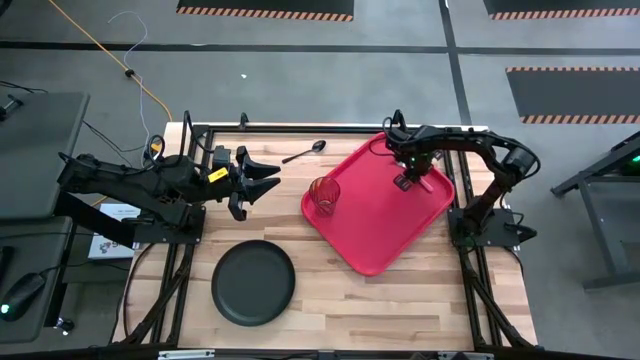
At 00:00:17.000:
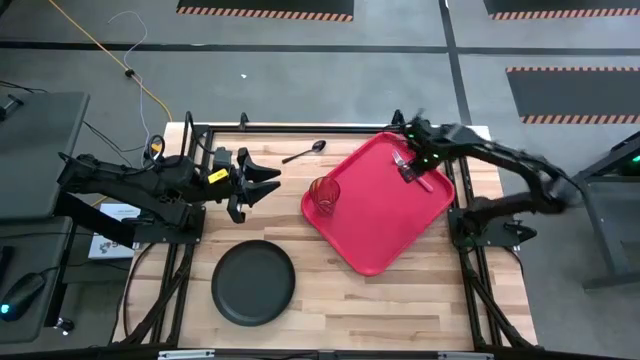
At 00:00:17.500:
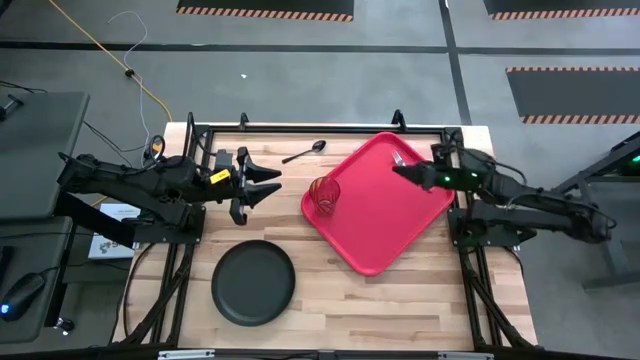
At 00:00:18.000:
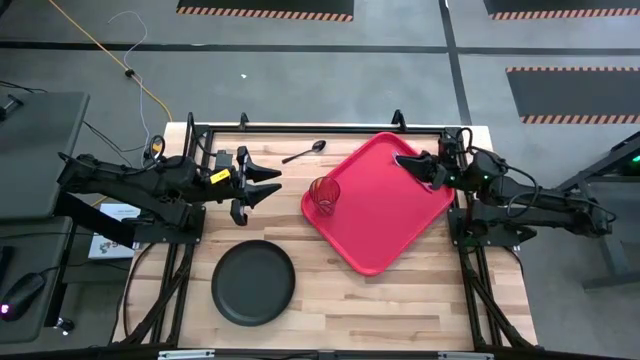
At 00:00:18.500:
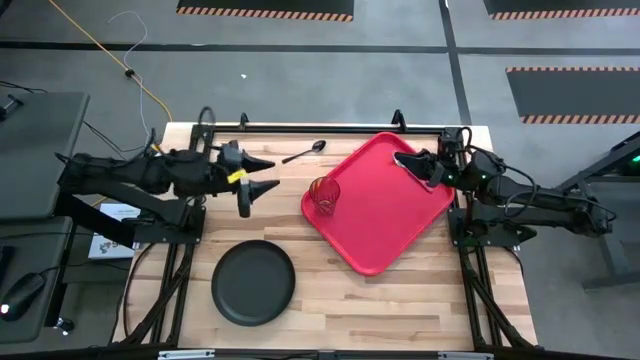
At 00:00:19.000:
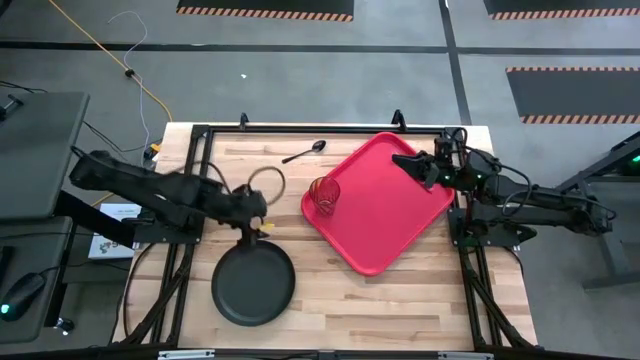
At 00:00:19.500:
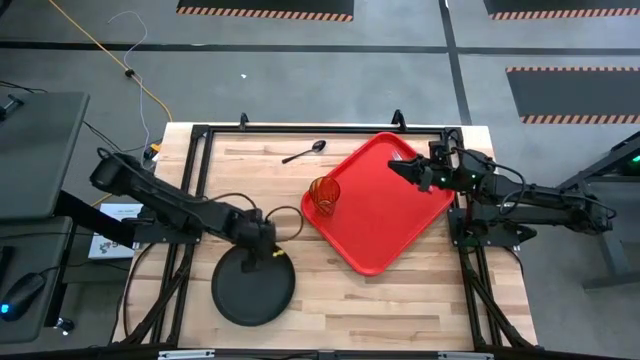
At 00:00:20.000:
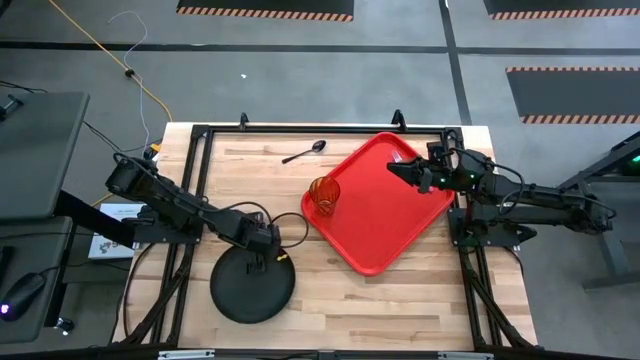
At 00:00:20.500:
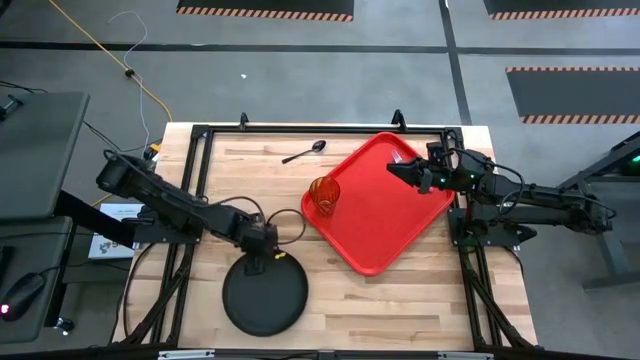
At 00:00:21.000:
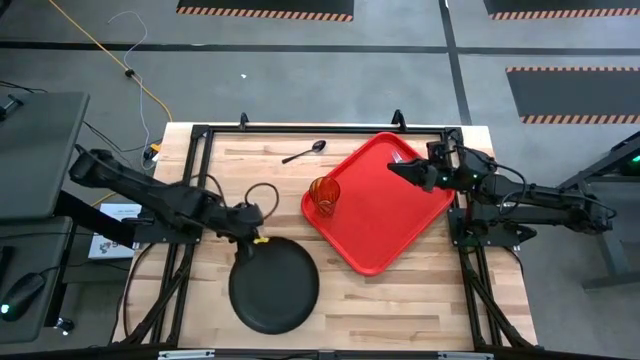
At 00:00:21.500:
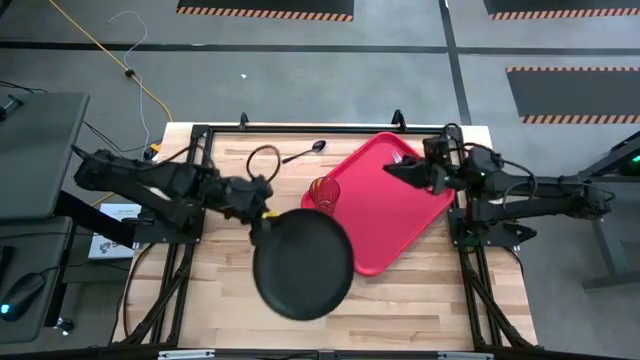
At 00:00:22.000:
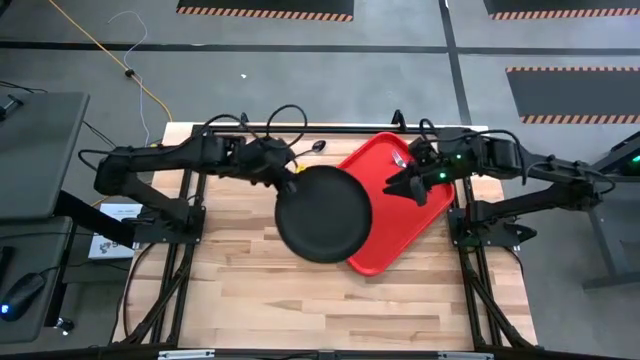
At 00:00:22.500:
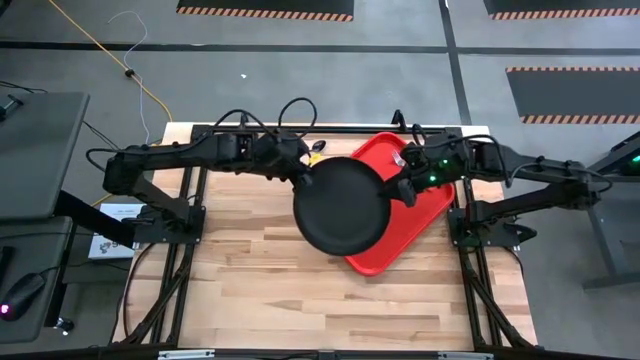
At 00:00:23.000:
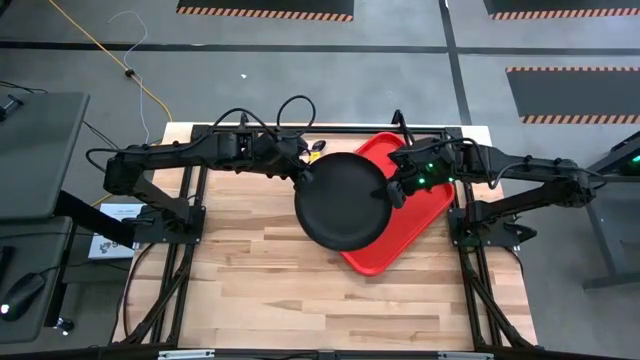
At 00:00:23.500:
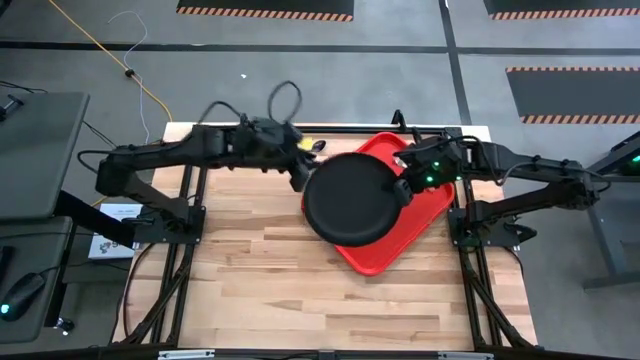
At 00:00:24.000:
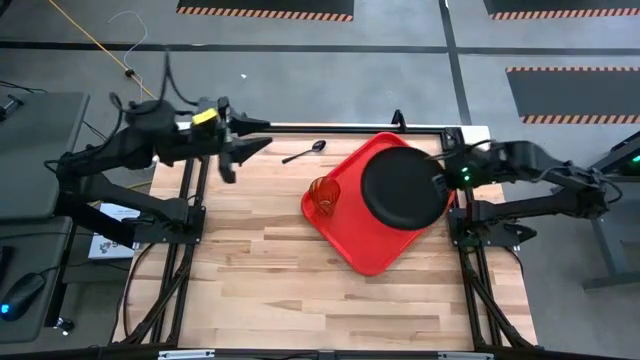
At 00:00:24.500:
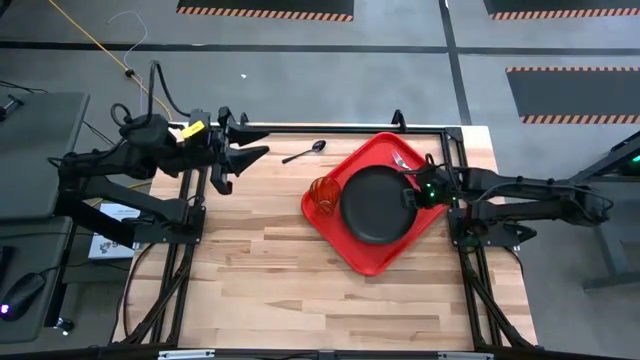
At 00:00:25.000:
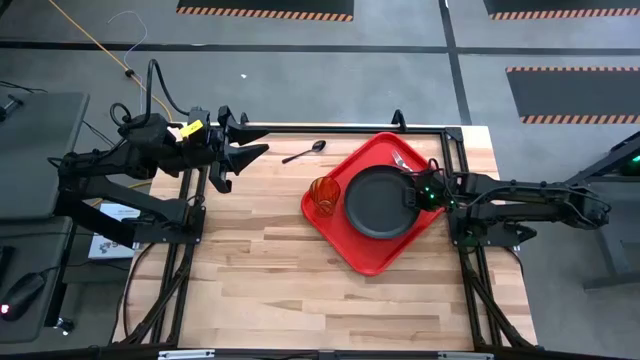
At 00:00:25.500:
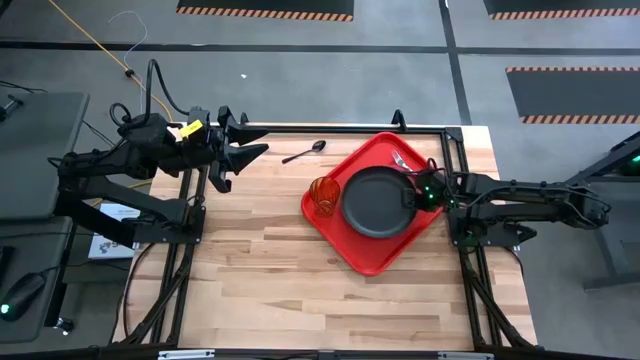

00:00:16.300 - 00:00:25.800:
Task: Pick and place plate/cup/fork/spoon on tray
Put the black plate on the red serving tray to the left of the pink fork

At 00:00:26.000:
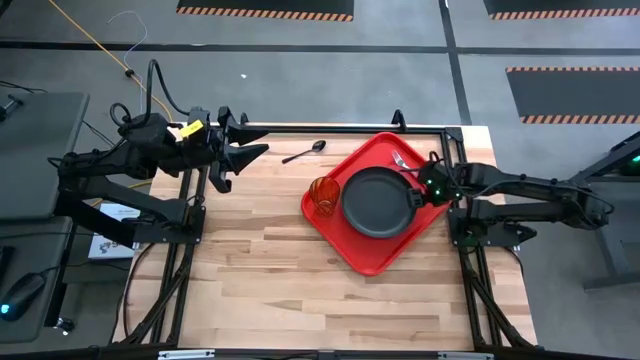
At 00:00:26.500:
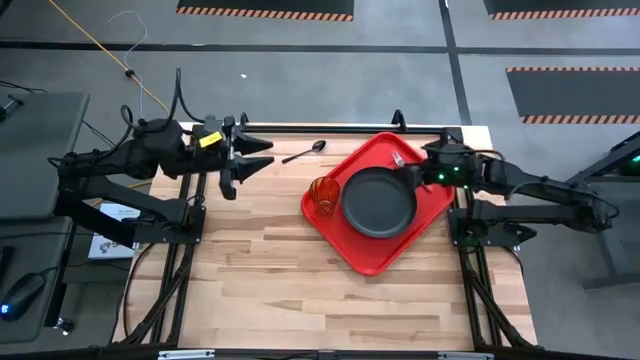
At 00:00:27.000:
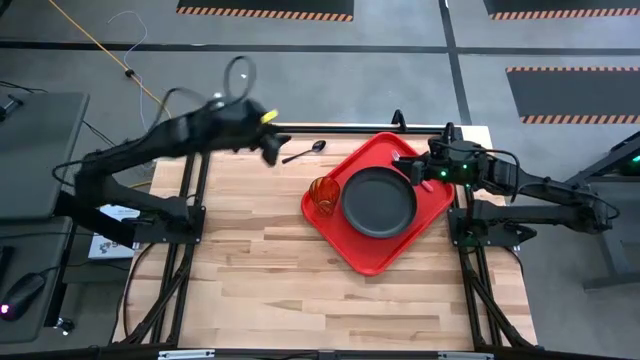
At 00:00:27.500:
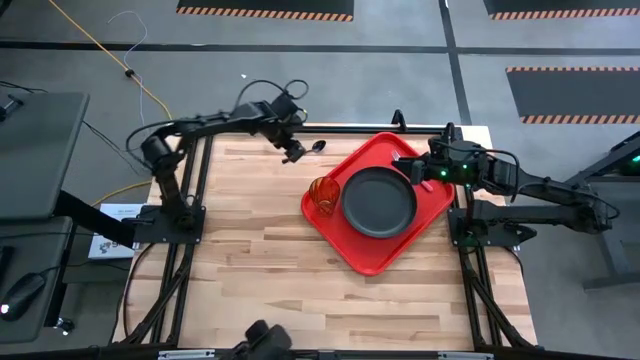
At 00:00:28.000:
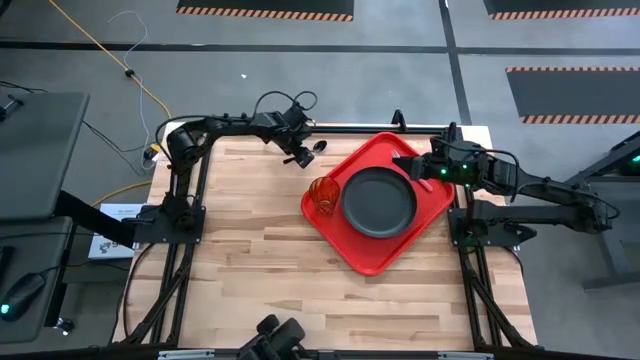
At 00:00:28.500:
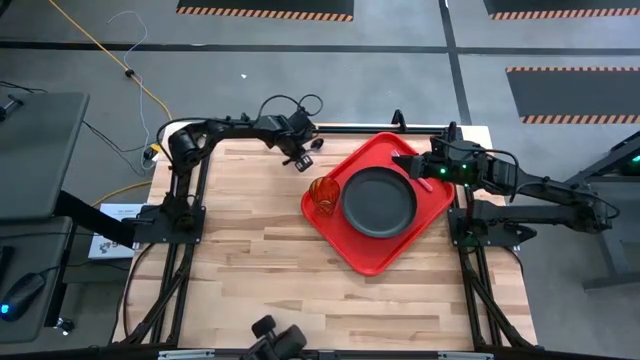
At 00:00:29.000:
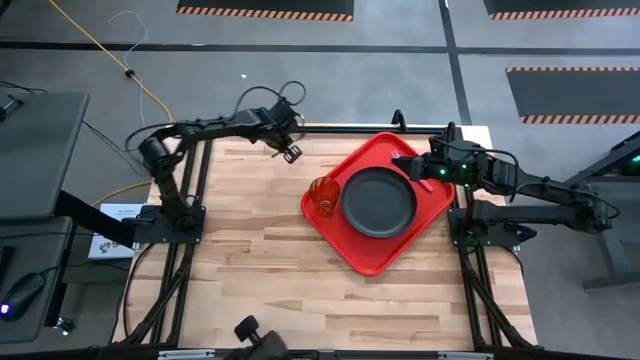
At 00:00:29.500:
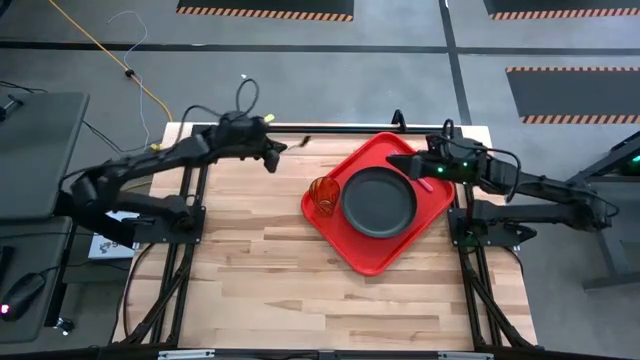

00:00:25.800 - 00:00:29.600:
Put the black spoon on the red serving tray to the right of the pink fork

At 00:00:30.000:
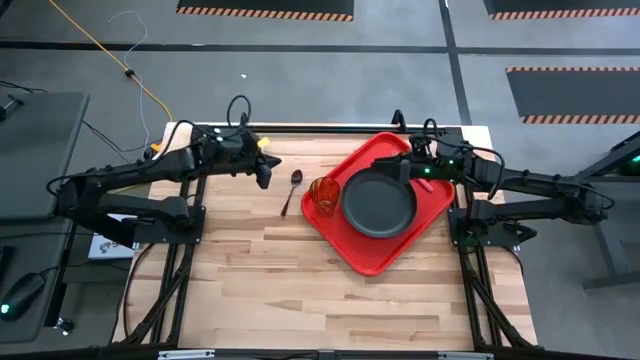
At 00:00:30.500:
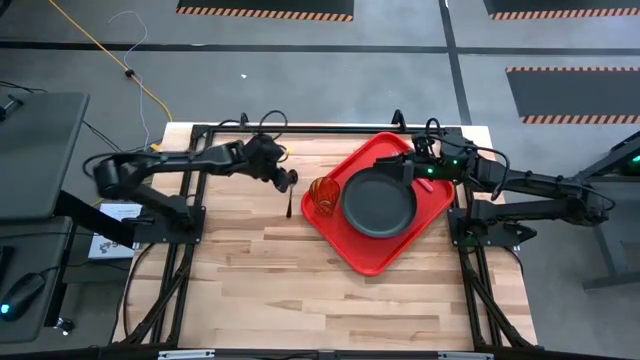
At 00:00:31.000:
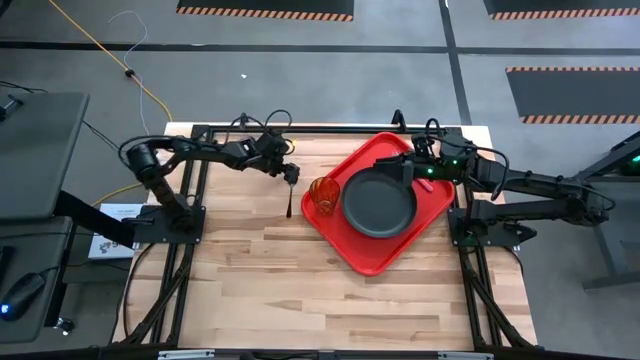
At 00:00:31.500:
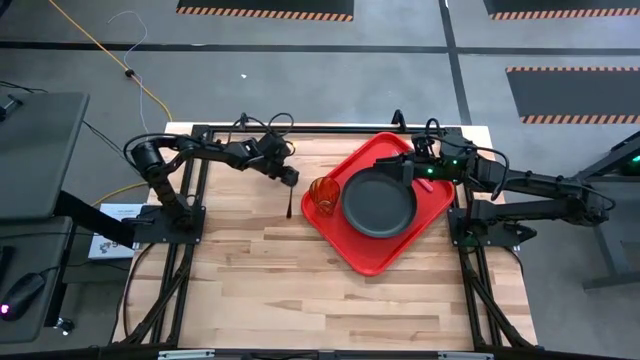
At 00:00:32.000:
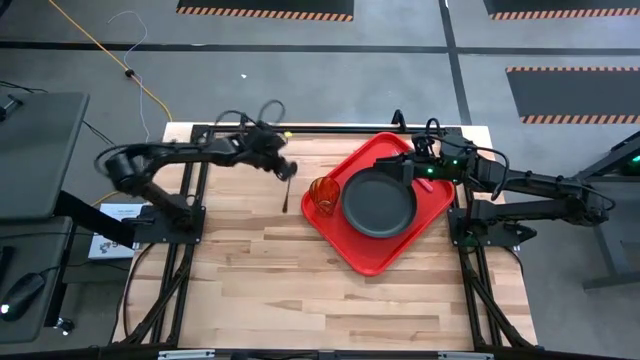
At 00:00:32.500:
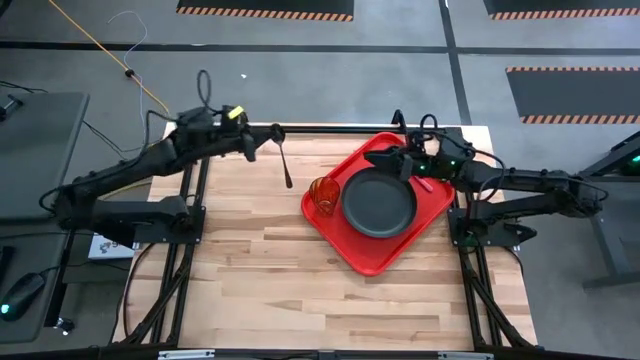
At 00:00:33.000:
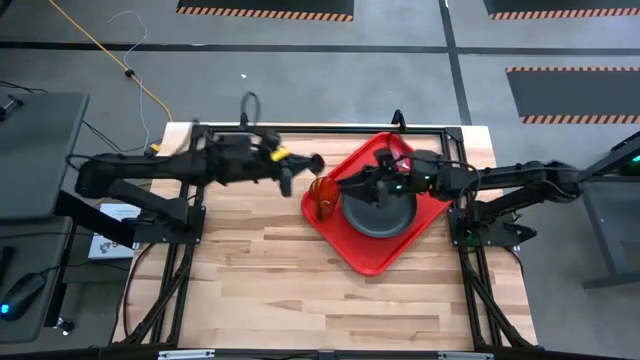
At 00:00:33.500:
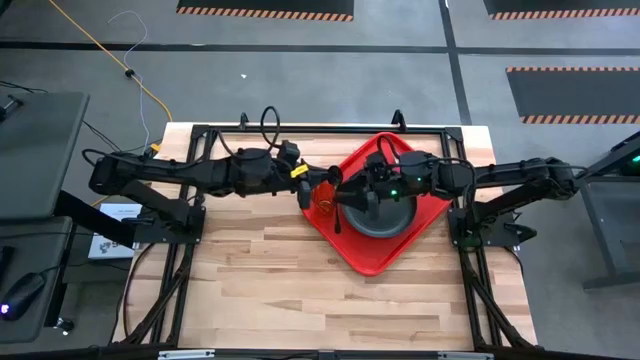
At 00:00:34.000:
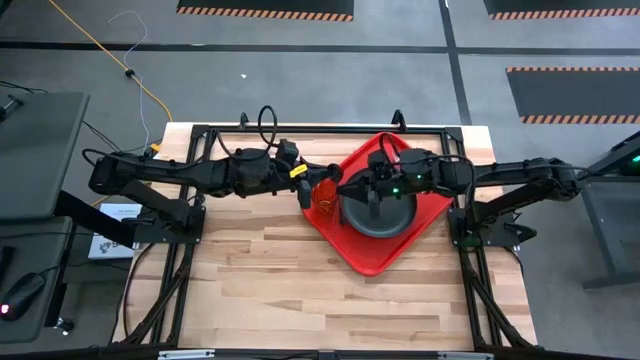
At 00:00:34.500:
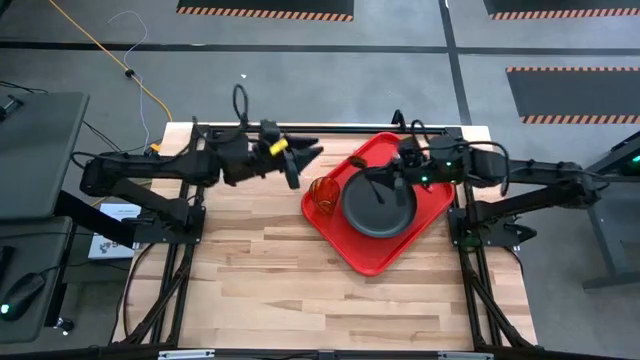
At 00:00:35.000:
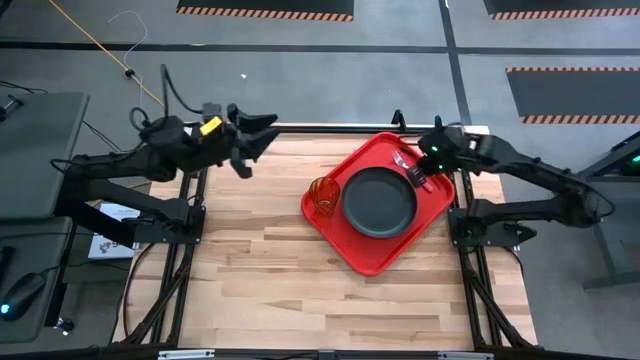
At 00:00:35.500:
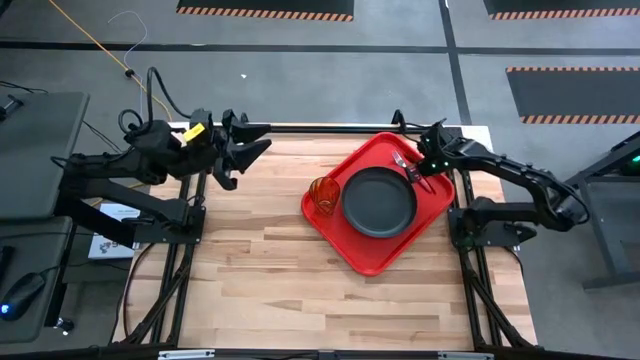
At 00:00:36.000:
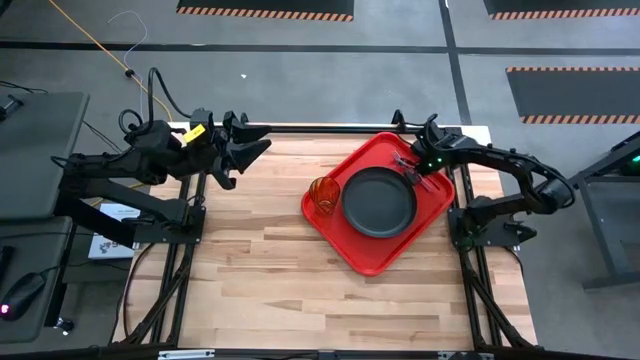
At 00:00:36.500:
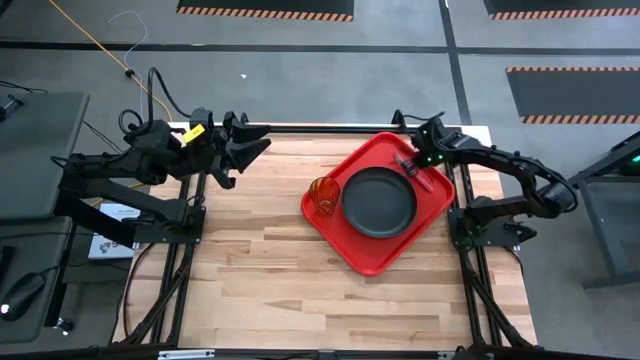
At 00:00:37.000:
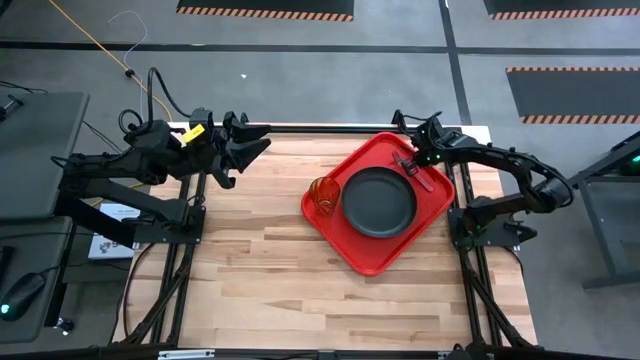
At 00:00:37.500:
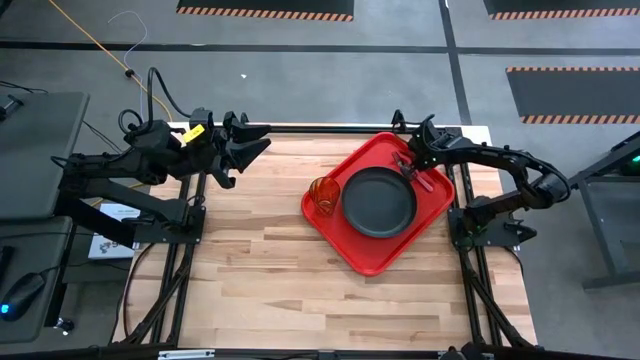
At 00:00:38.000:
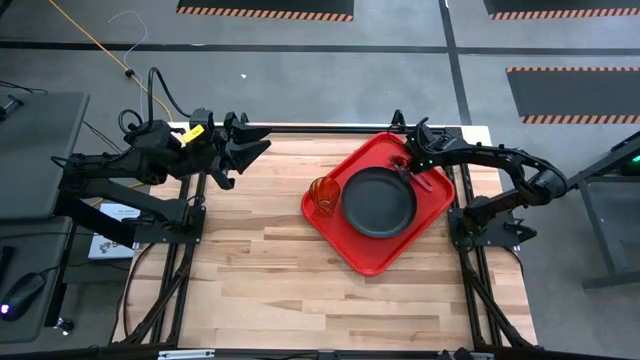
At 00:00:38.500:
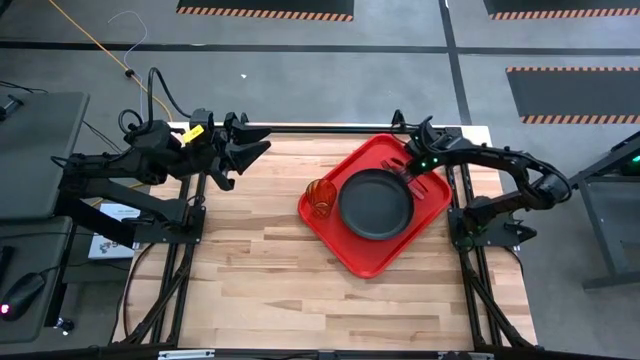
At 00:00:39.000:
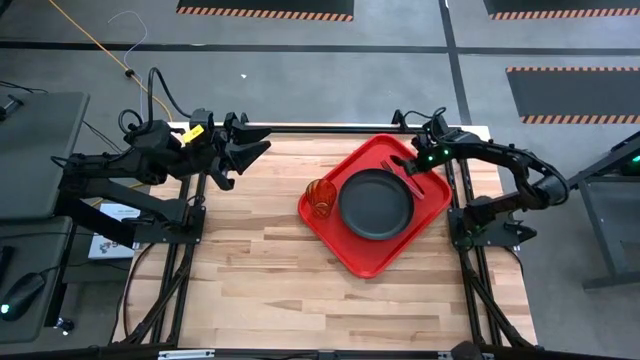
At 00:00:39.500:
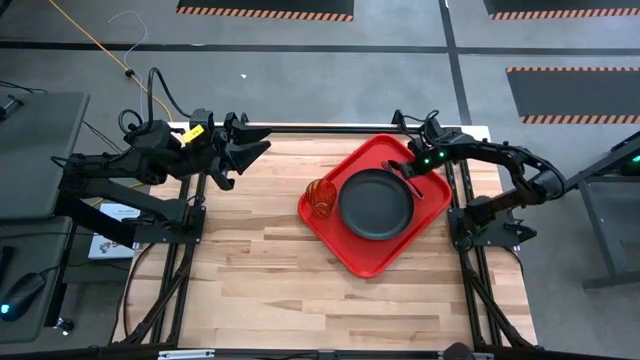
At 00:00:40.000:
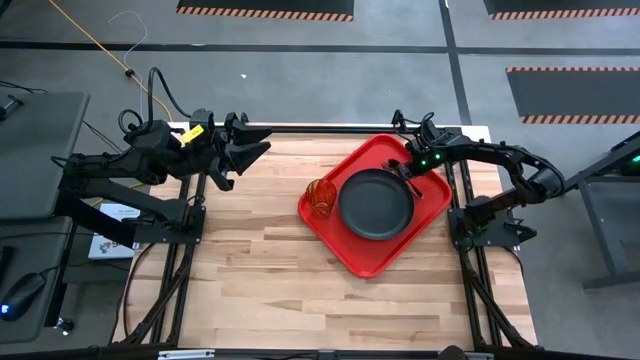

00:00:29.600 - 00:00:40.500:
Put the black spoon on the red serving tray to the right of the pink fork
